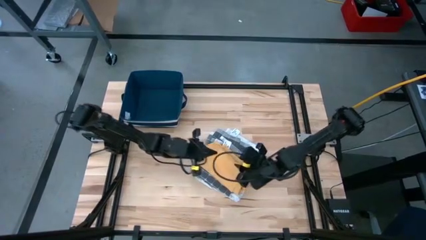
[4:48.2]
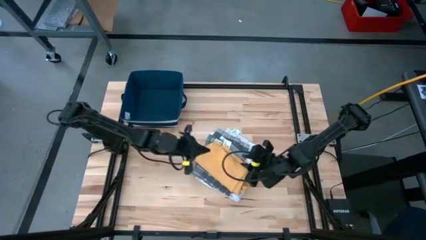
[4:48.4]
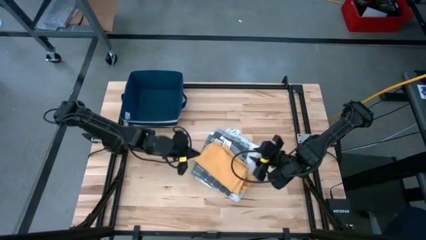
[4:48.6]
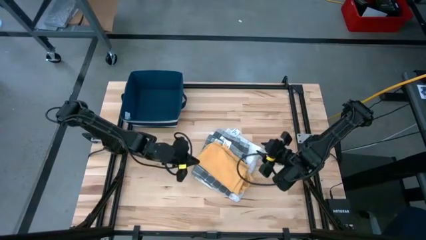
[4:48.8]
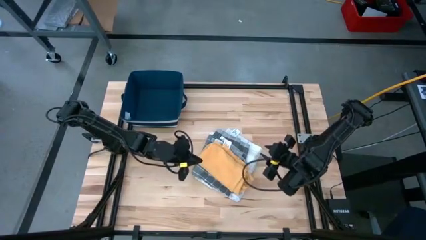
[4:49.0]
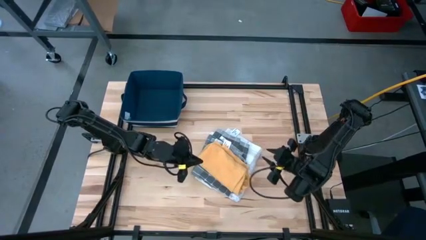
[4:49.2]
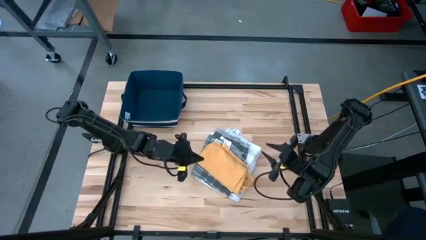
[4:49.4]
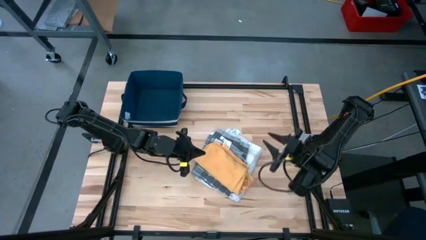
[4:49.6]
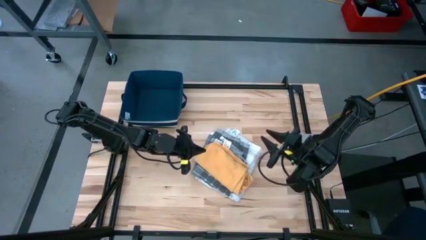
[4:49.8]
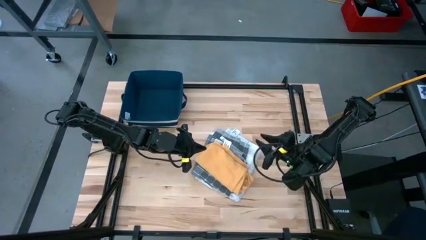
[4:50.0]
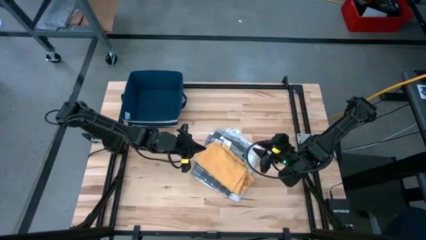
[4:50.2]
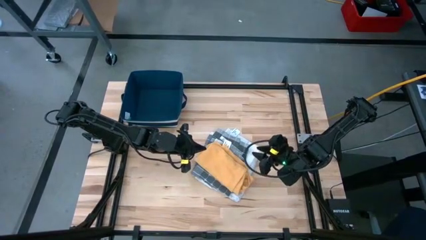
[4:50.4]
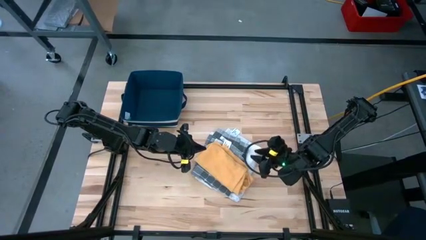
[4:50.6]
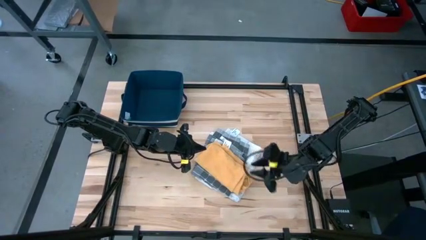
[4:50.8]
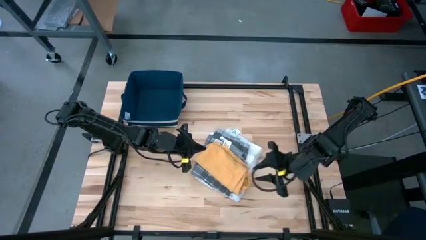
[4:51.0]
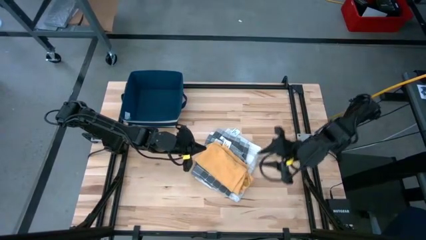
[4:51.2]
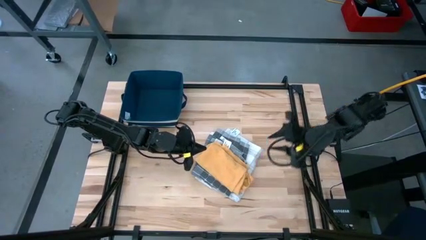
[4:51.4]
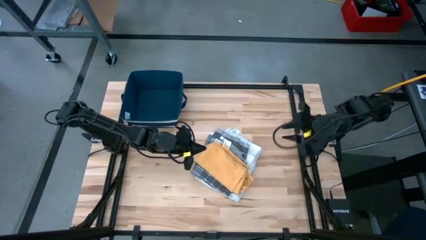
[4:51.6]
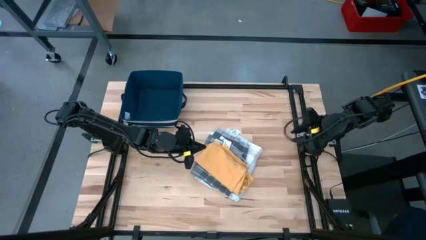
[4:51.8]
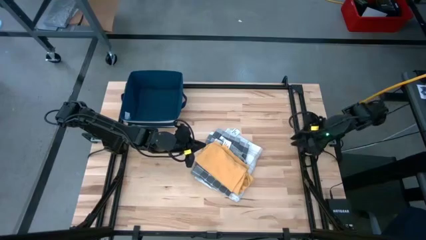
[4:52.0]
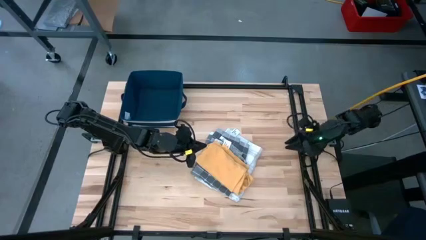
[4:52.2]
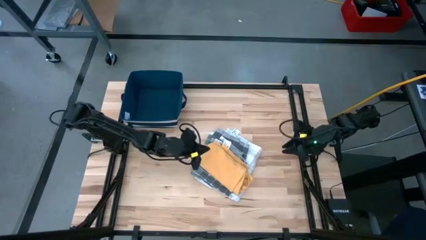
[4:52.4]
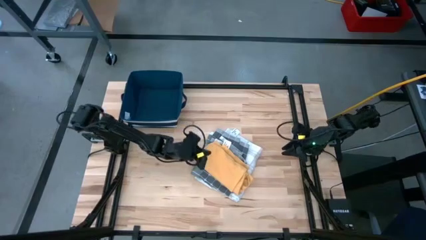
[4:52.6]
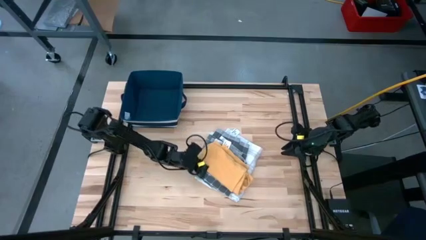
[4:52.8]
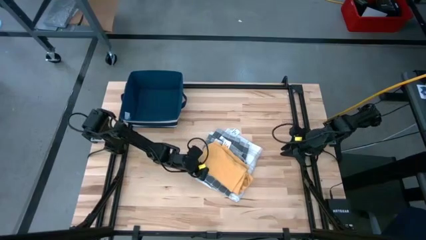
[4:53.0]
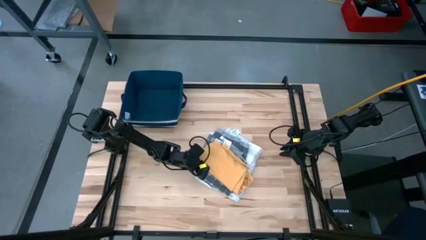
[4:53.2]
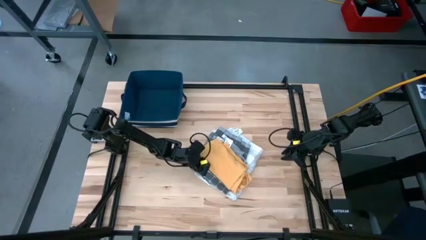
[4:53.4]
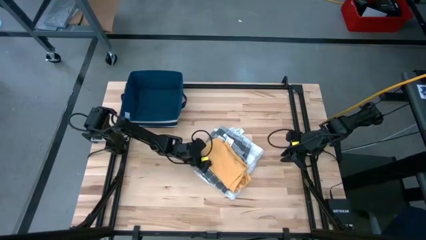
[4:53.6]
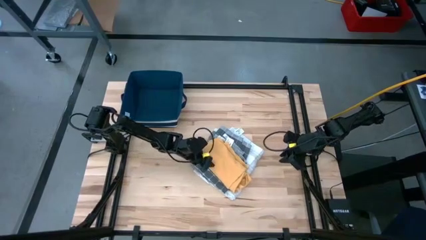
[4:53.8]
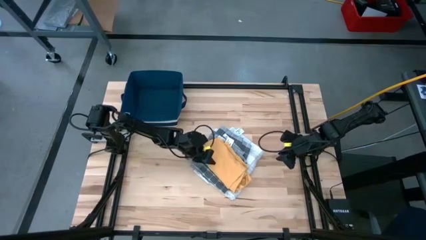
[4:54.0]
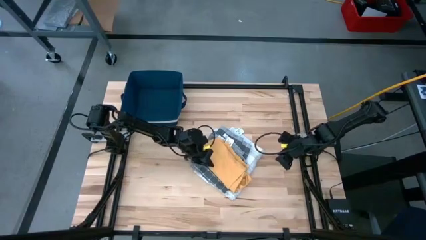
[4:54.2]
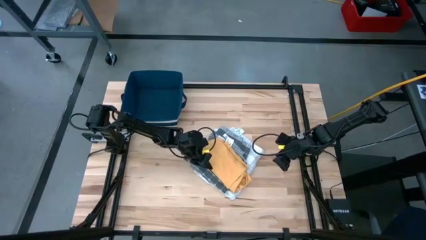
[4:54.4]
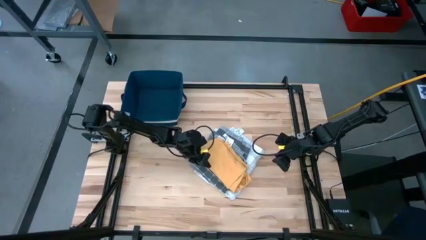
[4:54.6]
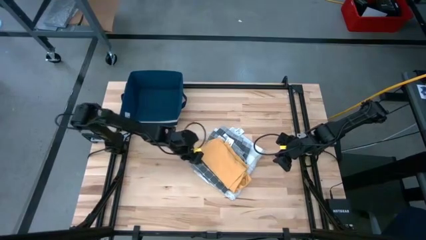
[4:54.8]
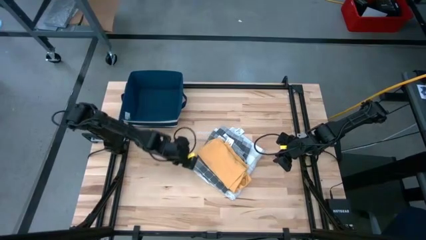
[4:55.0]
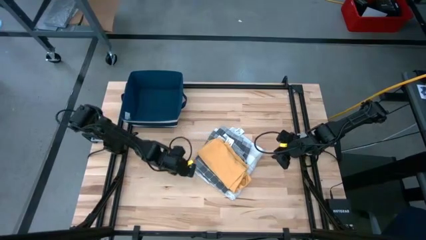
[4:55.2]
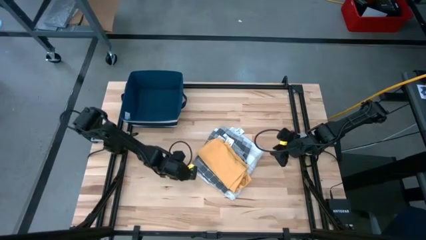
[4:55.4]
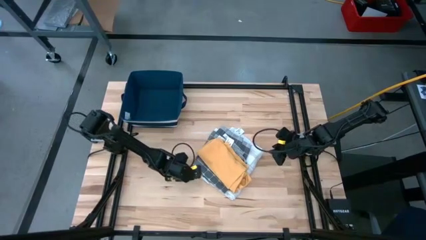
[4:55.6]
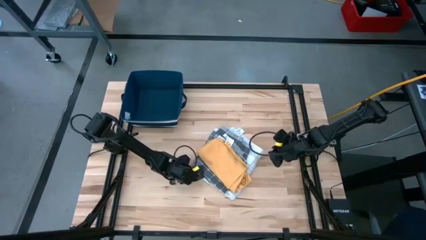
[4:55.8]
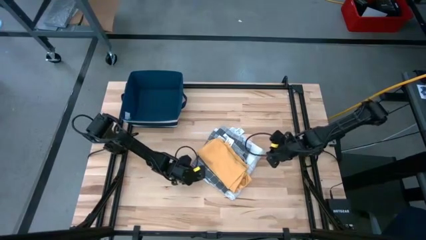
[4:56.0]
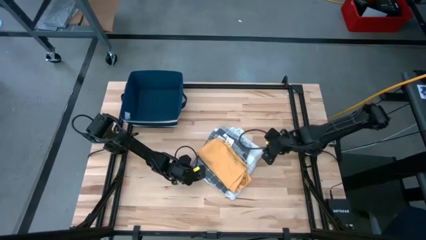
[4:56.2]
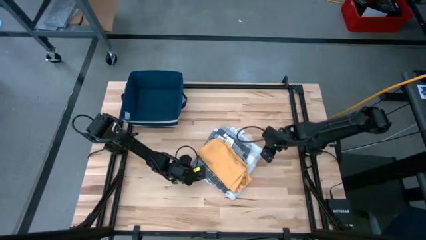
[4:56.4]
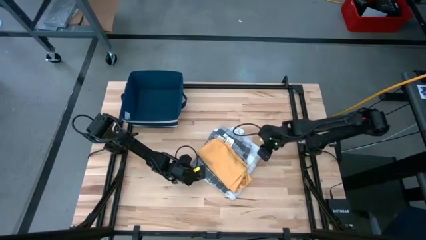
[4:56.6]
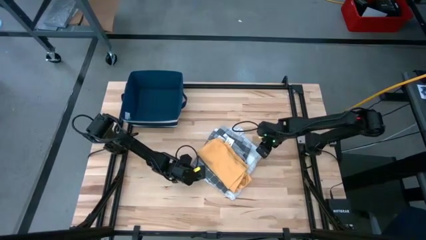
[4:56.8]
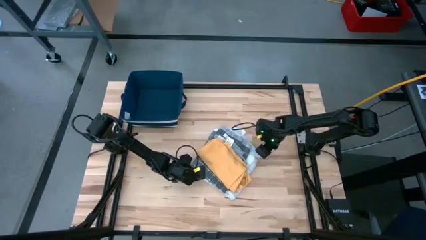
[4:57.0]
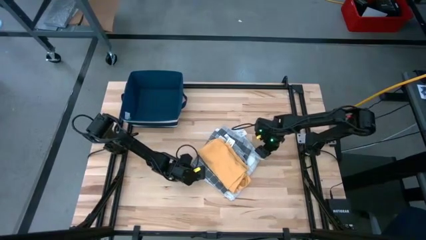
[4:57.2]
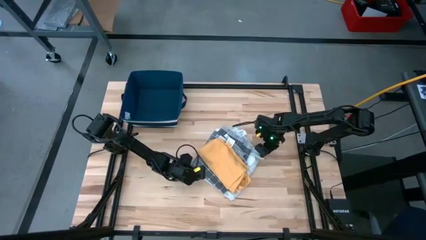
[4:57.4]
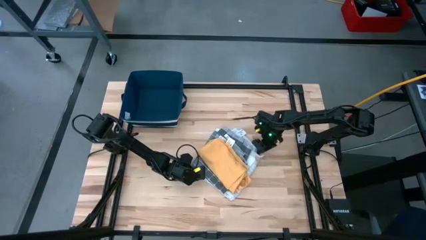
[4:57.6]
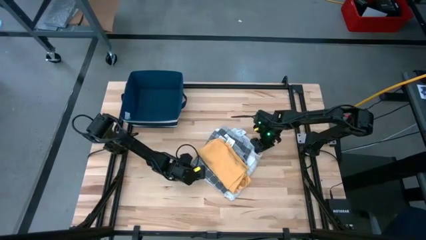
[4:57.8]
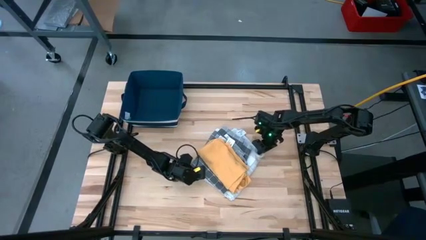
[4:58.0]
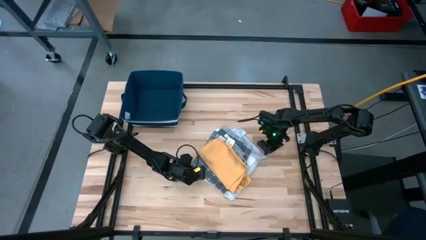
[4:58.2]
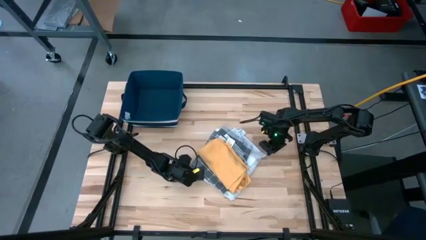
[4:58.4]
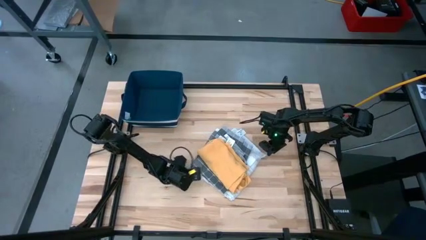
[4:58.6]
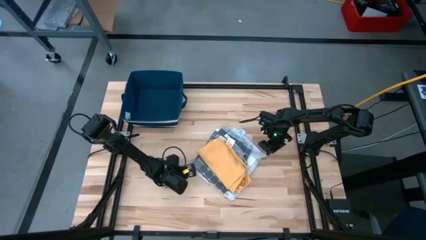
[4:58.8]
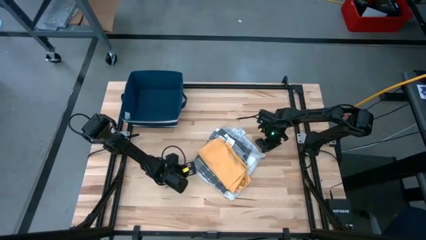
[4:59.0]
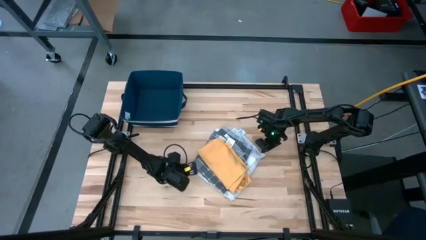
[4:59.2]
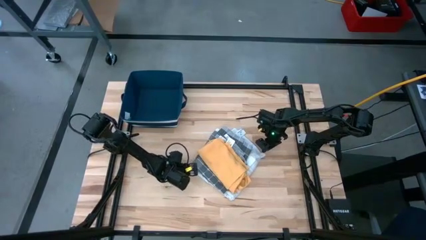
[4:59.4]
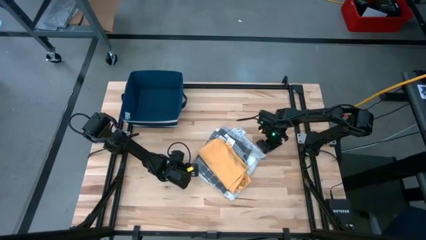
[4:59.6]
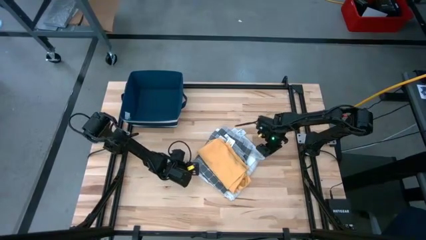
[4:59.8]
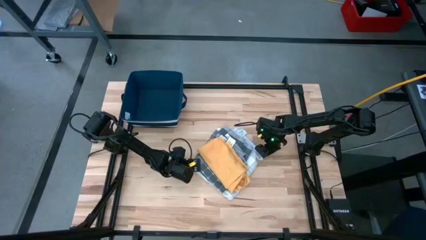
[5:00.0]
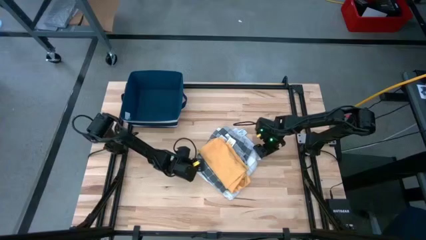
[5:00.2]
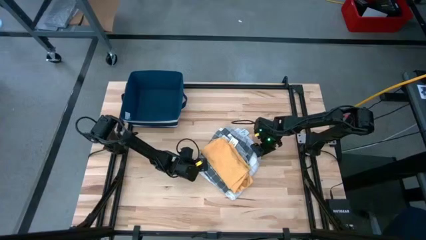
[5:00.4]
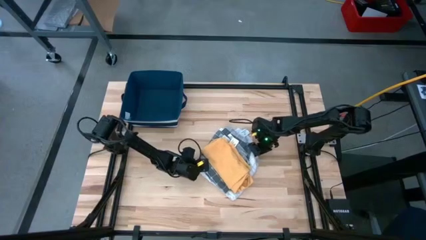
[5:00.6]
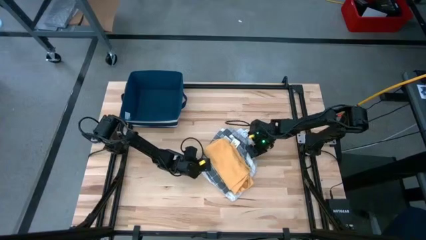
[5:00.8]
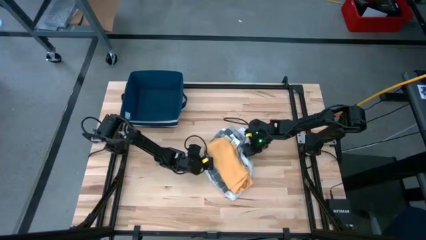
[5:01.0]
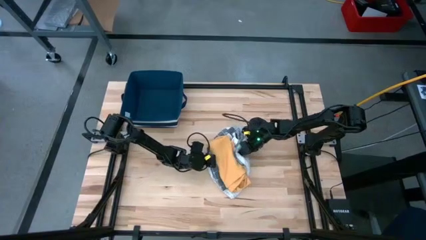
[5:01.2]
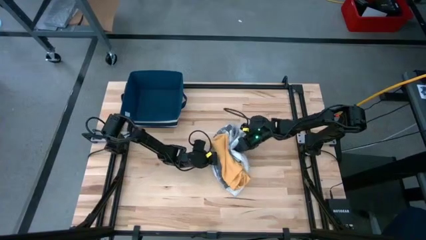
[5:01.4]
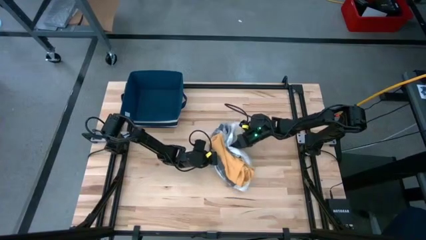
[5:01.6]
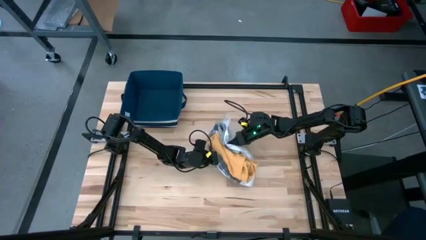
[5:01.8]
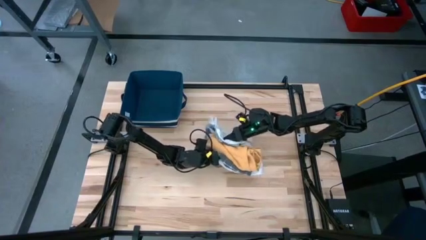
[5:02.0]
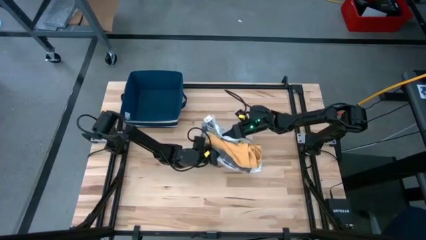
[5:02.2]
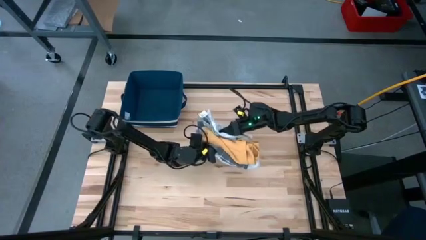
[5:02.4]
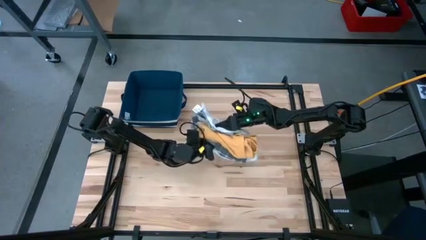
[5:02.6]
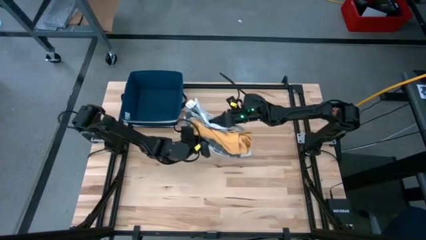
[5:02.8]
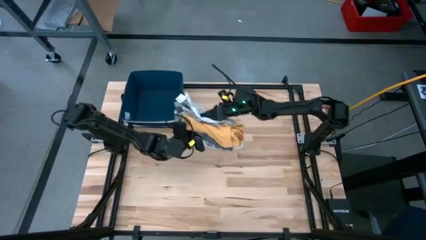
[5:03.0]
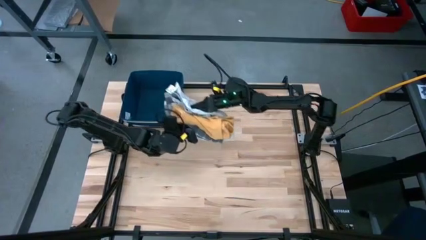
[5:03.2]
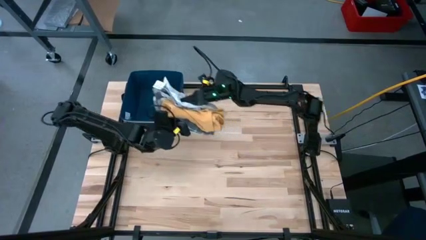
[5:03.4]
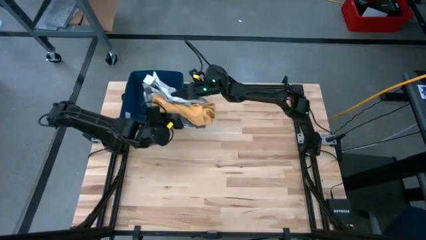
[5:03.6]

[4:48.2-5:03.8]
Task: Fold towel
Put the stacked folded towels into the laundry organizer
